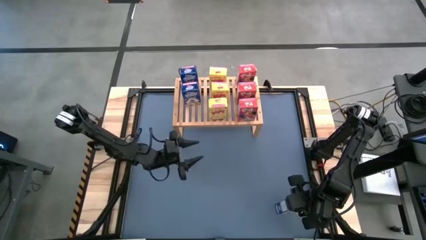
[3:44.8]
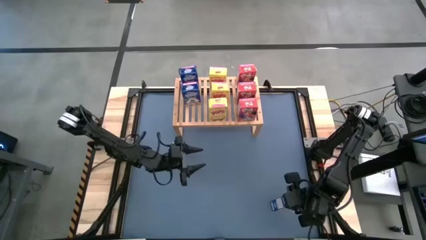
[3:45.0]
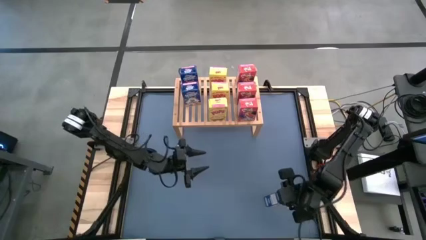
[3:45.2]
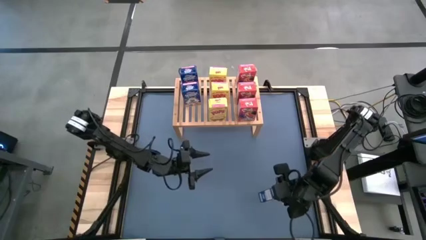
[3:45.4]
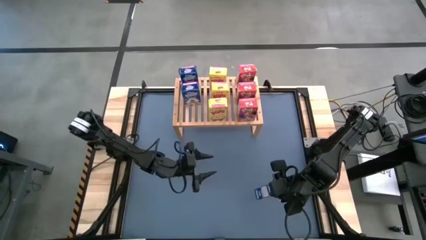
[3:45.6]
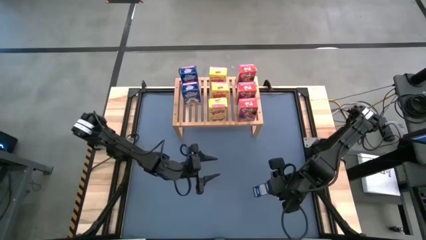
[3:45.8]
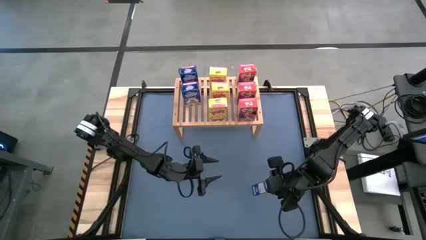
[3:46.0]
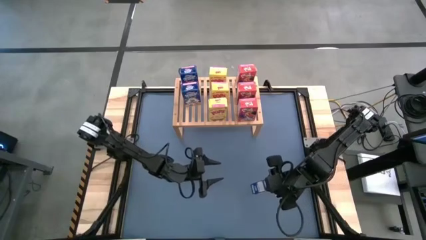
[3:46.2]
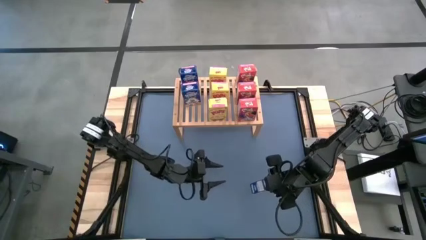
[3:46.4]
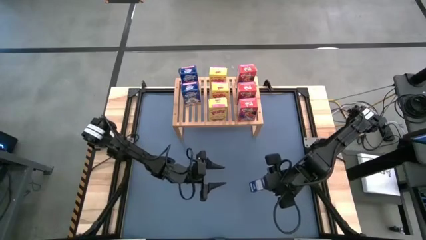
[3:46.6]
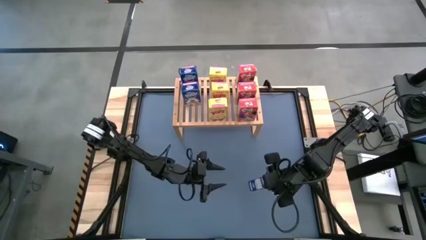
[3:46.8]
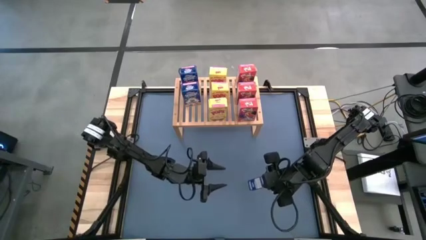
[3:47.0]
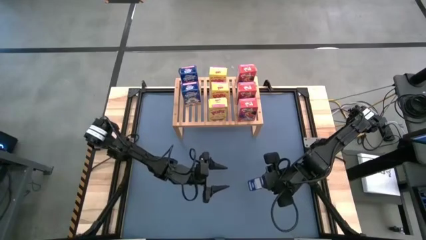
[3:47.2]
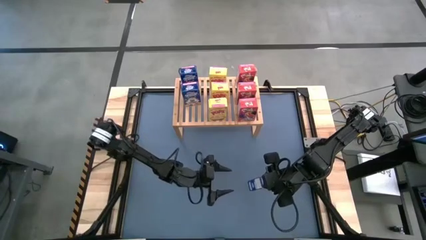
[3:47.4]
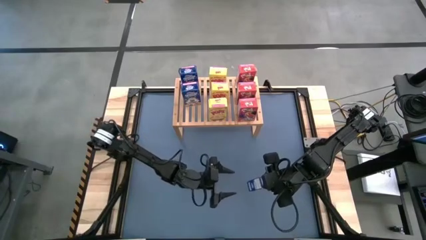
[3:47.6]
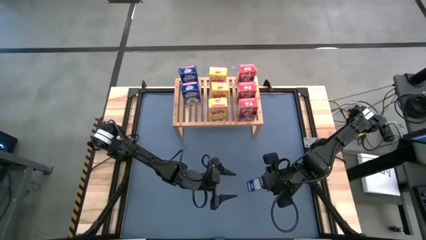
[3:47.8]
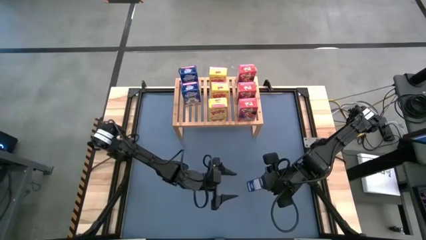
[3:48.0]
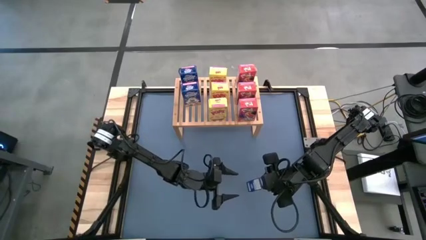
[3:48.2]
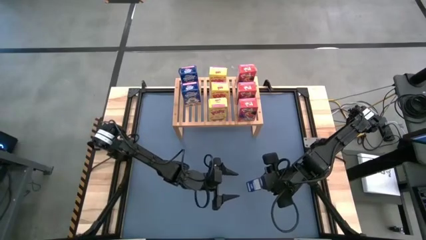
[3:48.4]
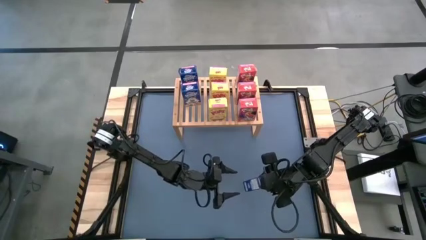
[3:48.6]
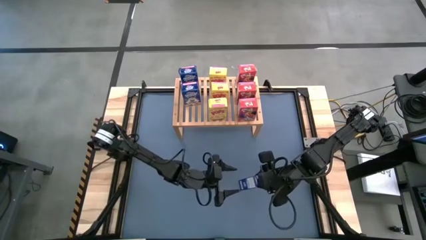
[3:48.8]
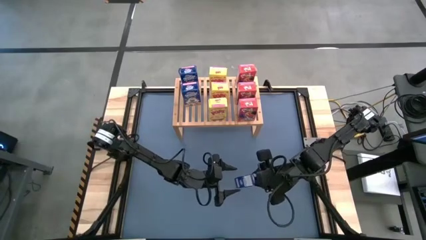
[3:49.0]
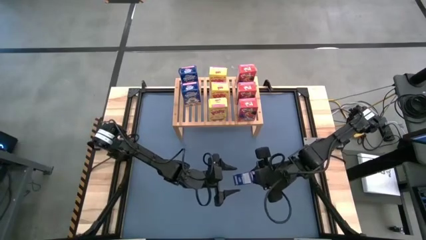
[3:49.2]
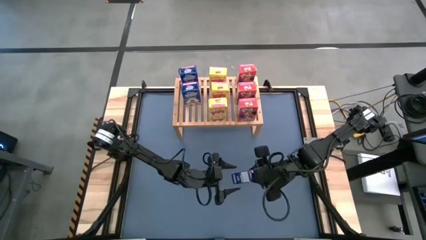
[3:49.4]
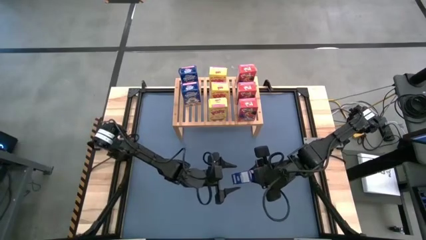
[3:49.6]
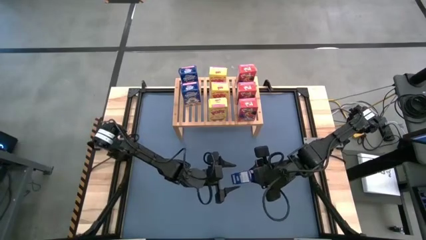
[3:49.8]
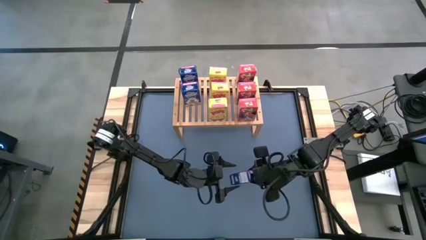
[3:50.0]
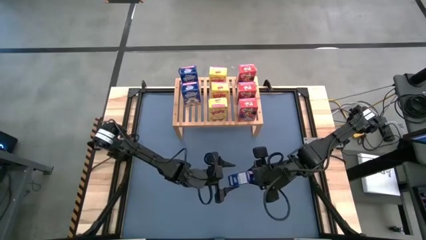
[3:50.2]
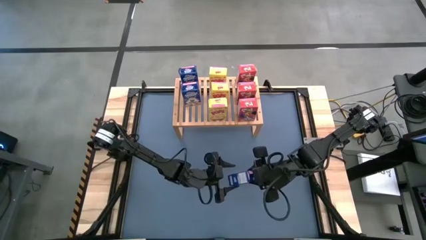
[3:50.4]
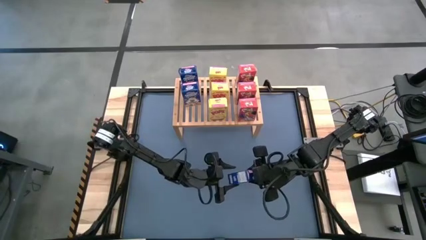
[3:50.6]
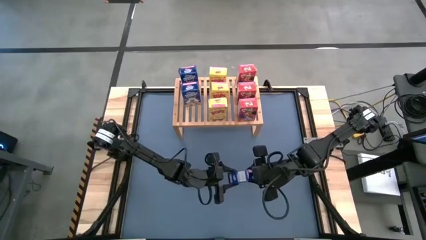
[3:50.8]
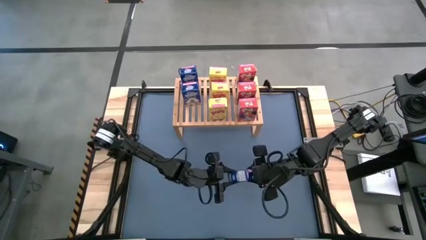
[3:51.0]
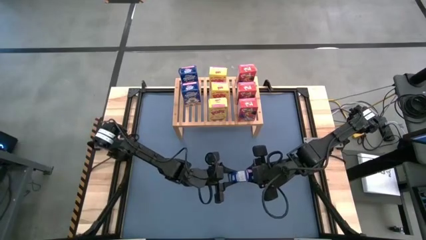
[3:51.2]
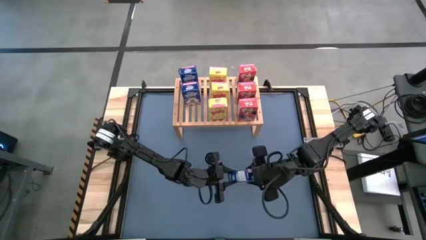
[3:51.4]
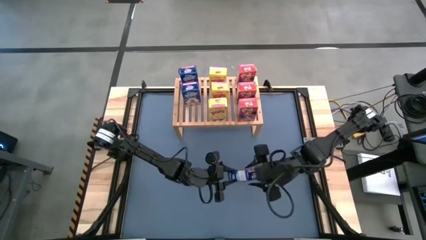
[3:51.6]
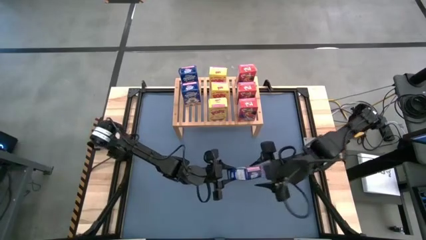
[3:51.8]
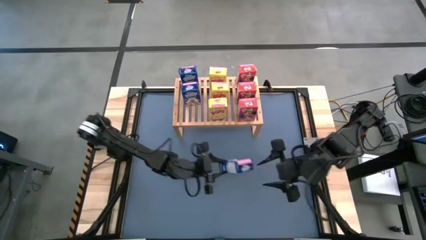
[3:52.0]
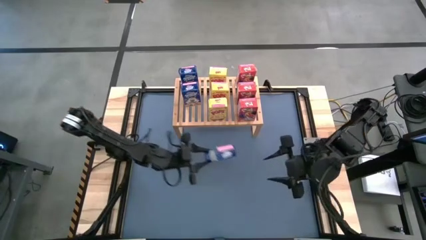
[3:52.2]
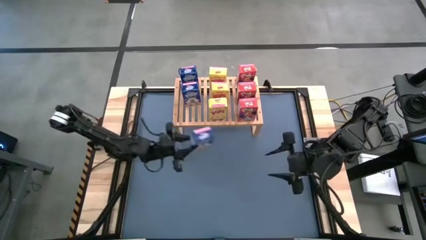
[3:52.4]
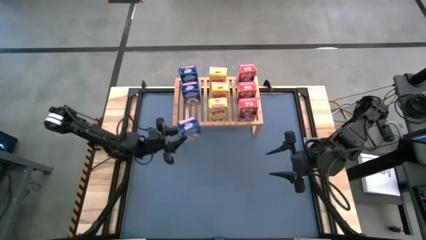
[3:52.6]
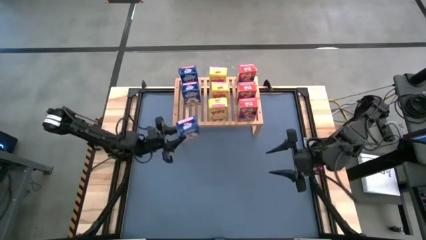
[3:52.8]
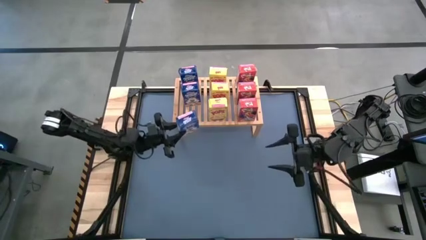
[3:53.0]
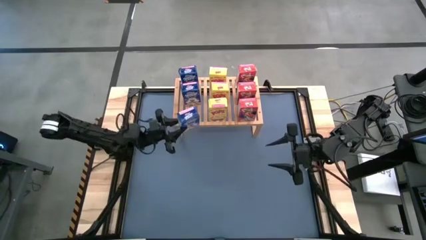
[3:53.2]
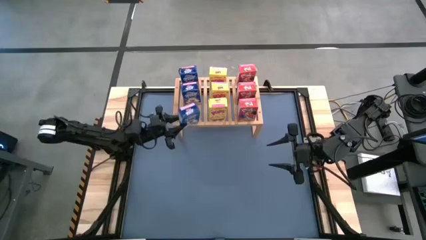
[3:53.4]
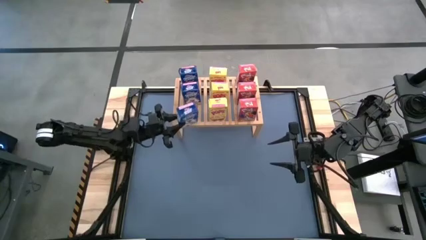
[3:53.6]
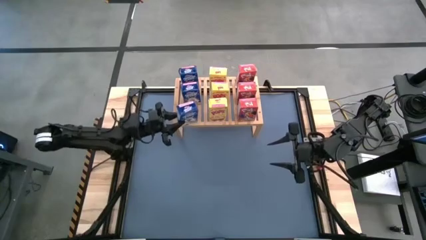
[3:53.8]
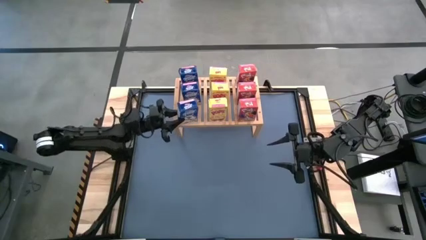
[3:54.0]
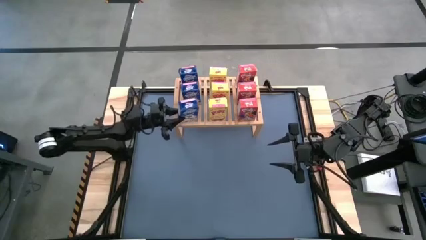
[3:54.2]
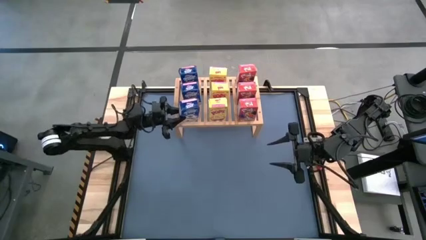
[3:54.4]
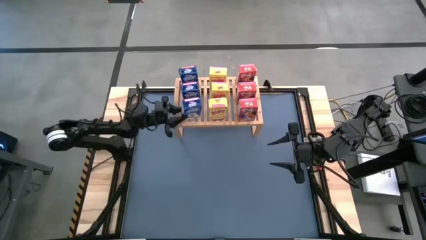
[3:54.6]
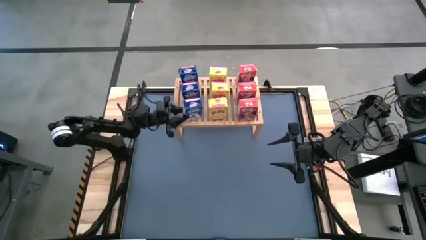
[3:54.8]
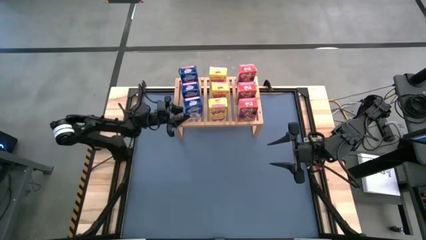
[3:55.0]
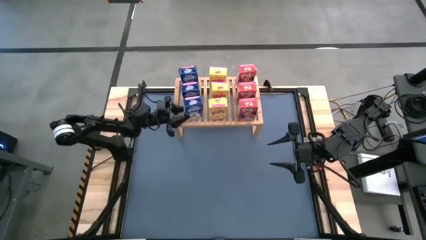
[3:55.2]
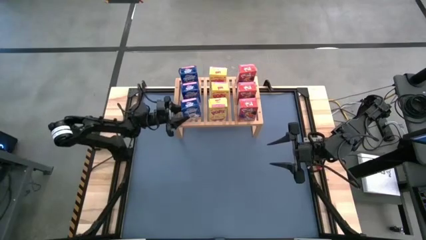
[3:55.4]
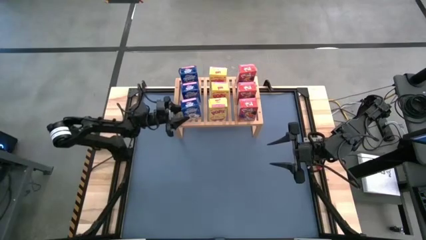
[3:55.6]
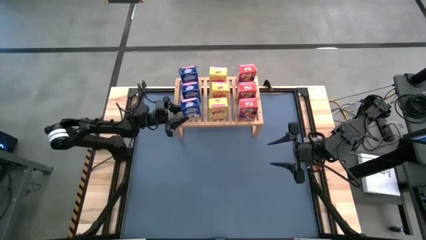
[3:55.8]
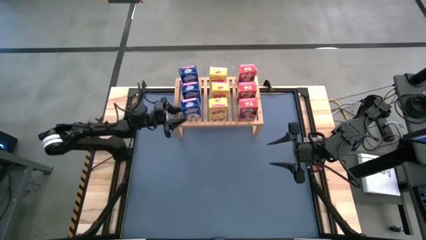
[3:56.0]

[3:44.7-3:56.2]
Task: Stack cereal on shelf
Put the blue cereal box on the shelf aligned with the other blue cereal boxes

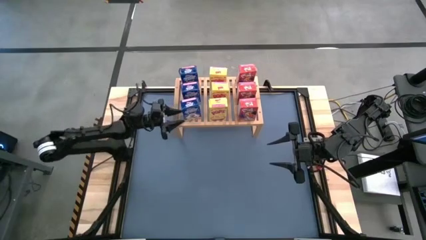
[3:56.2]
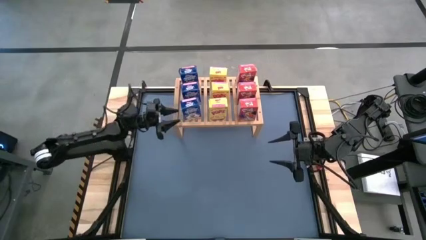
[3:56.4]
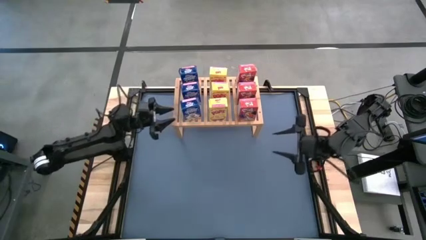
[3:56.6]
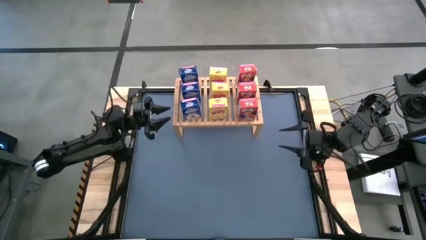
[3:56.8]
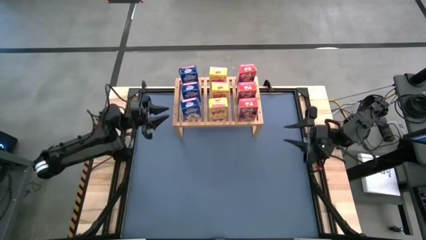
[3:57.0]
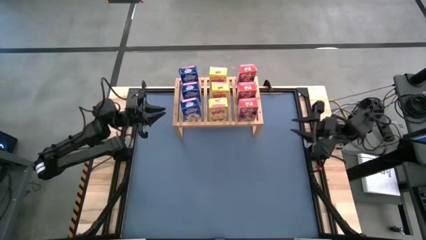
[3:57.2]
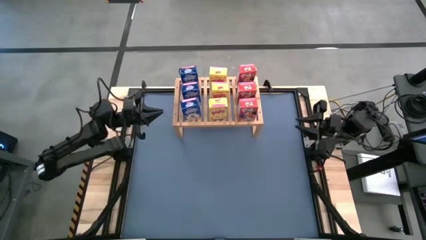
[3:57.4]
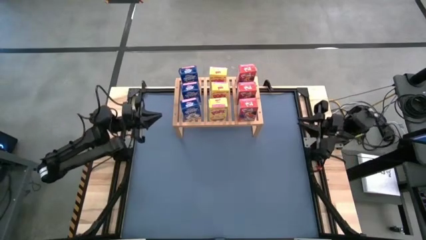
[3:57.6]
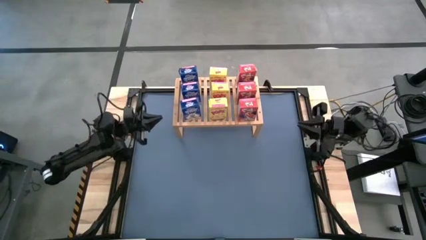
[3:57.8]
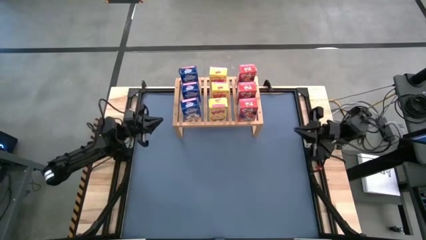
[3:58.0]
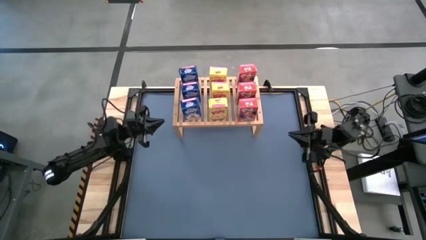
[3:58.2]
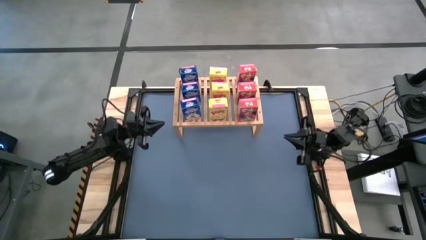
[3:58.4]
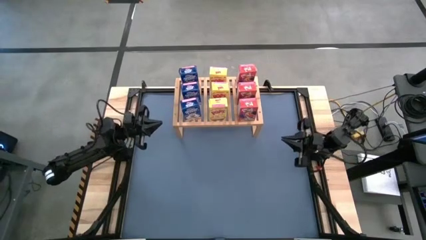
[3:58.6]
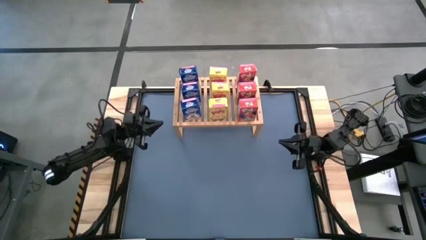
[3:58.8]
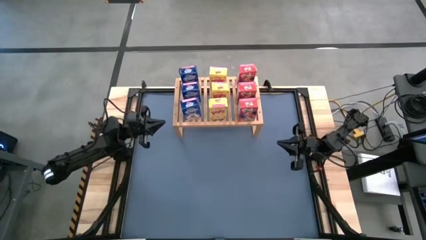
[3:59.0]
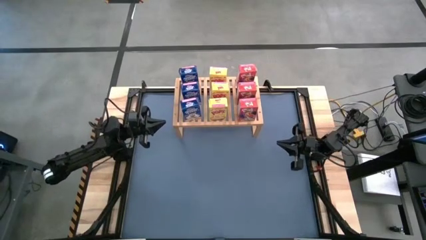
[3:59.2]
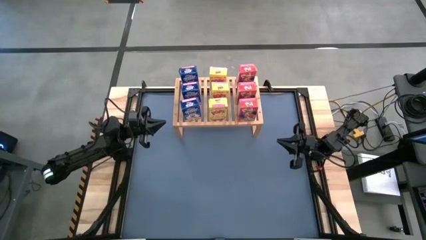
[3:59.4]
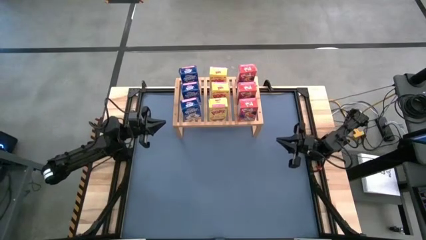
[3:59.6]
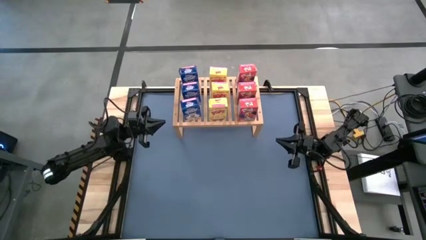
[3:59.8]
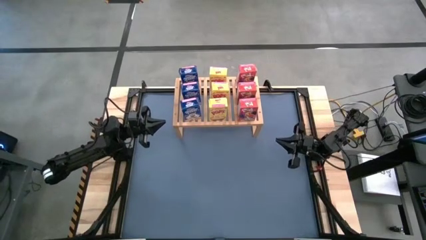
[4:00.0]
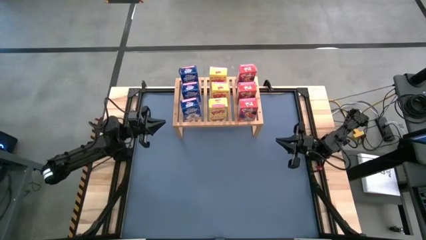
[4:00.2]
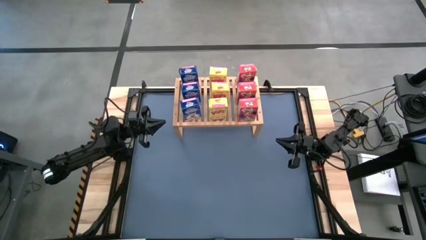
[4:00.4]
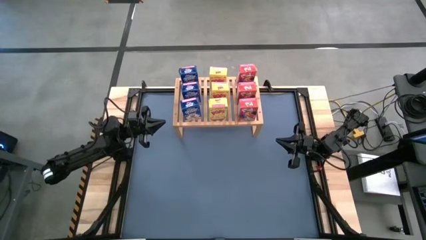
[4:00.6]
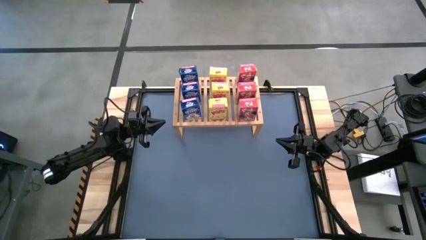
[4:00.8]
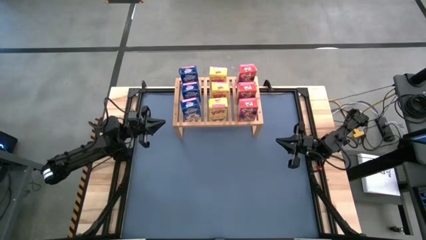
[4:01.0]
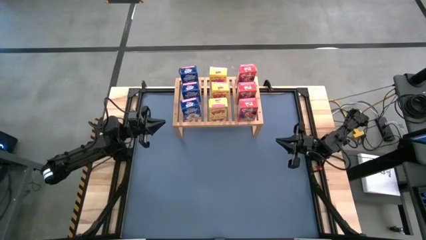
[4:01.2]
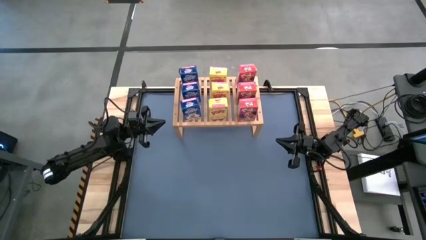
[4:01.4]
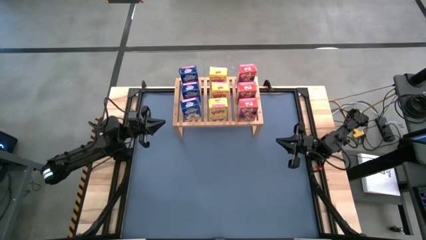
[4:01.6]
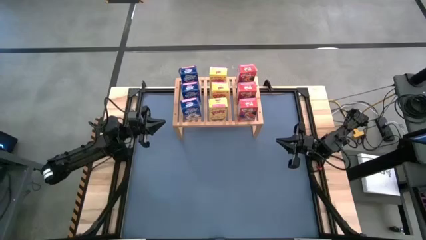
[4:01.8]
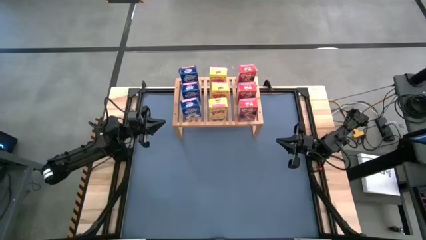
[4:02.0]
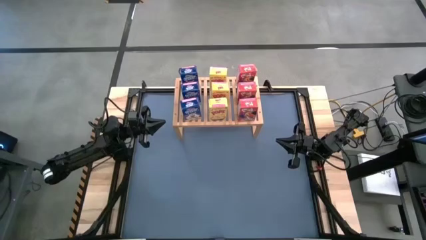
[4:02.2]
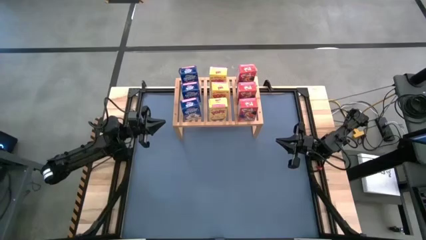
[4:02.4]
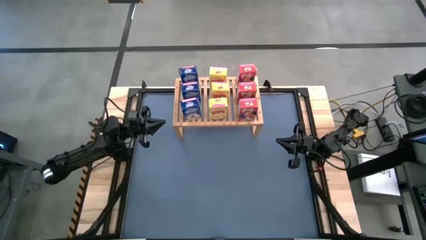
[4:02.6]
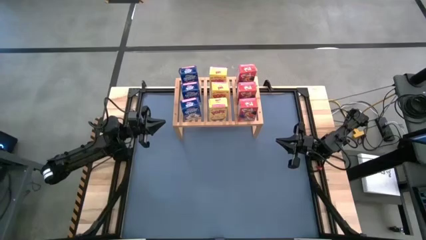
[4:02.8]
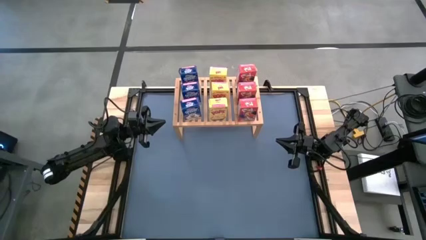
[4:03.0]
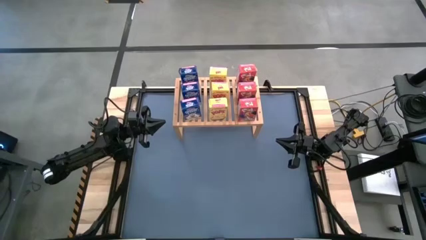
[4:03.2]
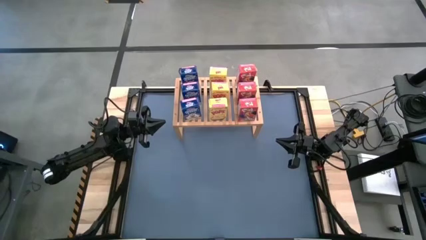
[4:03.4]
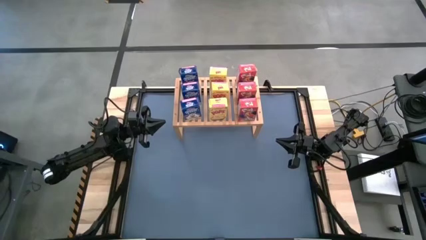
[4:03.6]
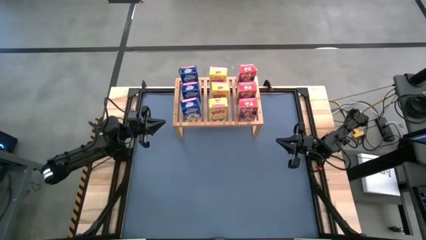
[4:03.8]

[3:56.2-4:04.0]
Return to Home Position
